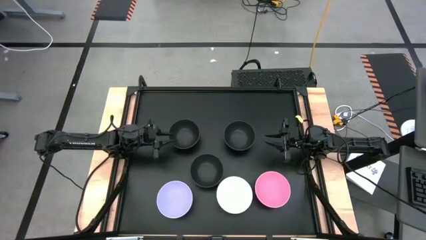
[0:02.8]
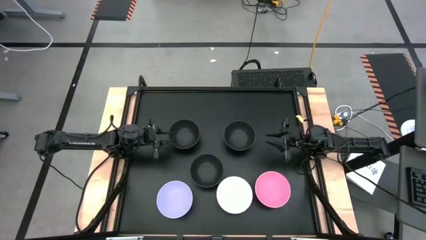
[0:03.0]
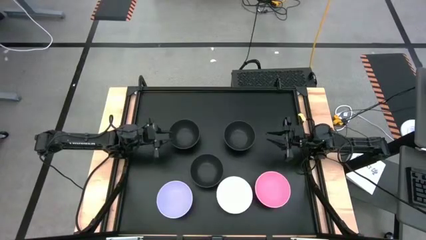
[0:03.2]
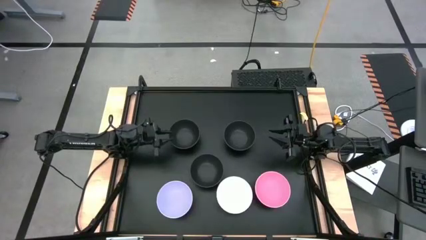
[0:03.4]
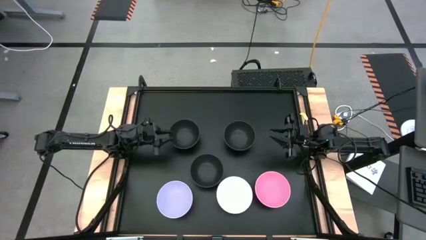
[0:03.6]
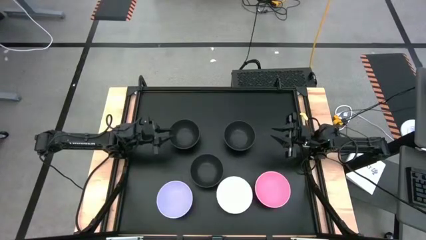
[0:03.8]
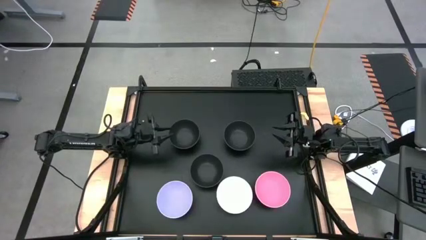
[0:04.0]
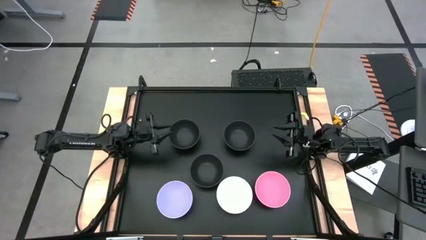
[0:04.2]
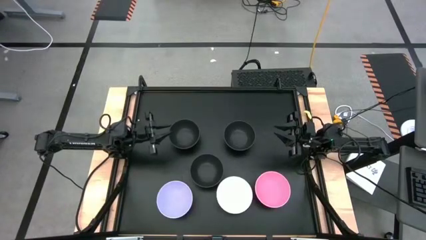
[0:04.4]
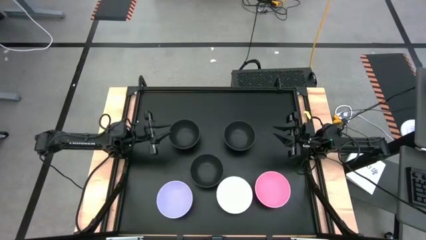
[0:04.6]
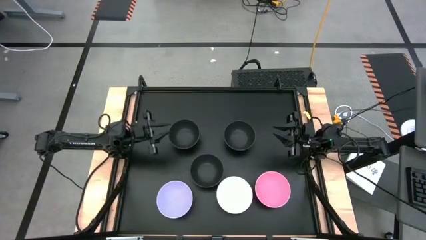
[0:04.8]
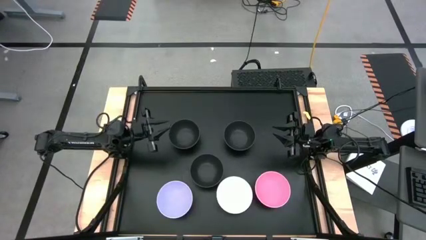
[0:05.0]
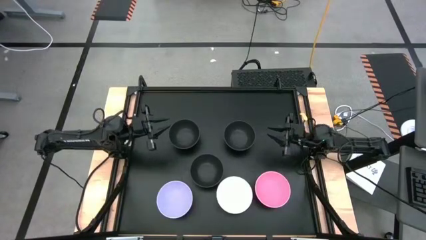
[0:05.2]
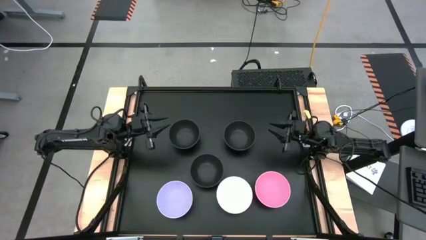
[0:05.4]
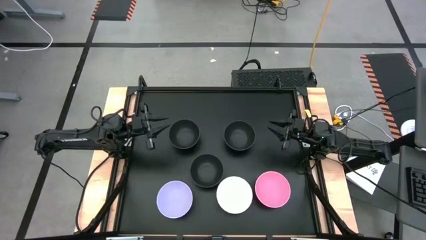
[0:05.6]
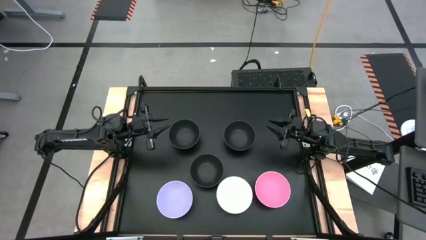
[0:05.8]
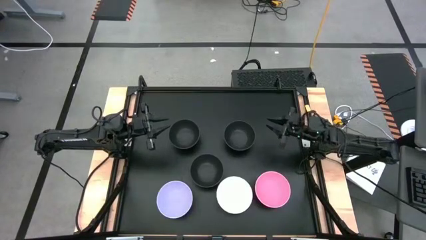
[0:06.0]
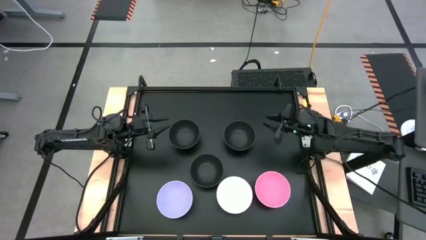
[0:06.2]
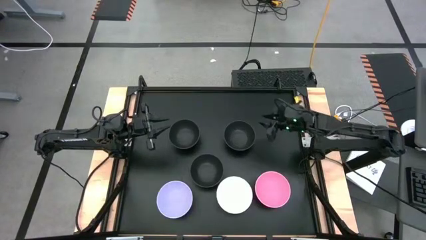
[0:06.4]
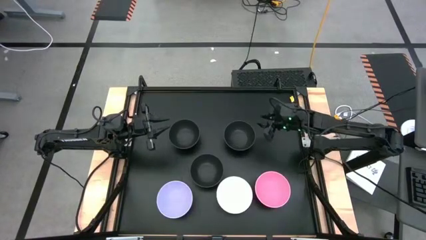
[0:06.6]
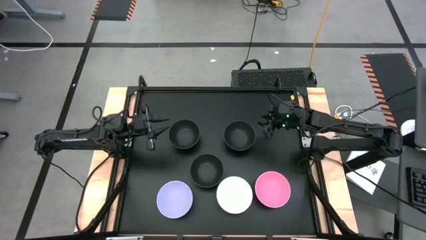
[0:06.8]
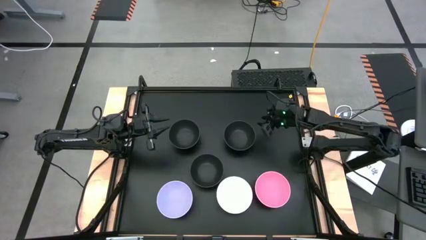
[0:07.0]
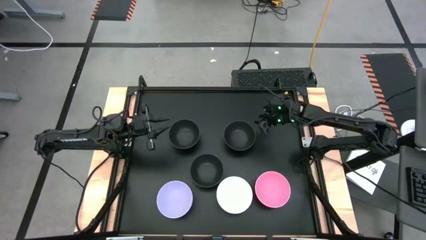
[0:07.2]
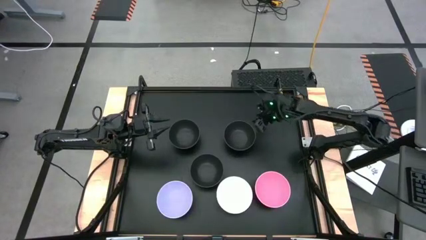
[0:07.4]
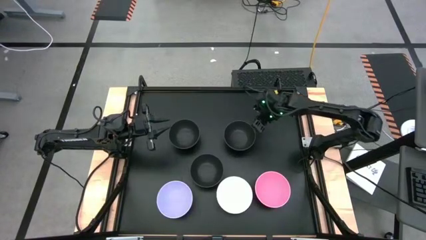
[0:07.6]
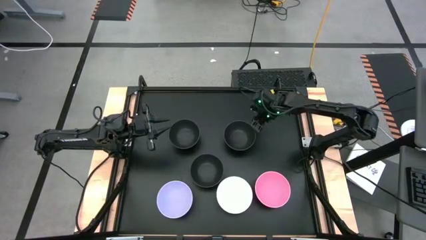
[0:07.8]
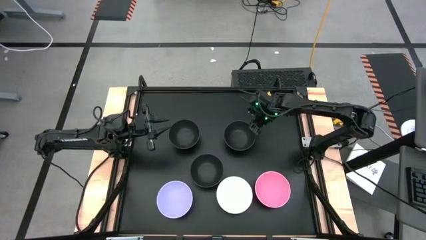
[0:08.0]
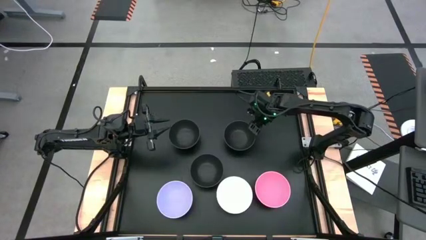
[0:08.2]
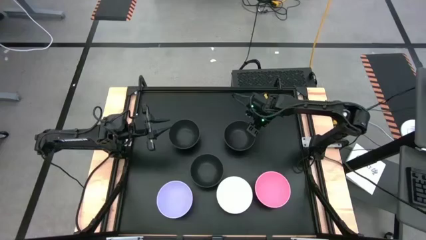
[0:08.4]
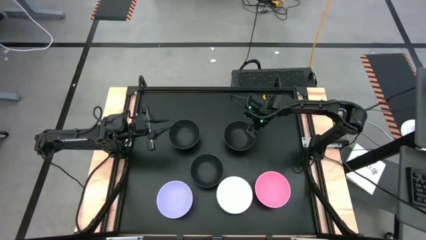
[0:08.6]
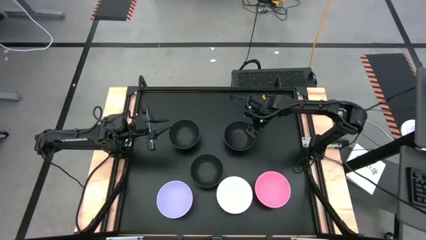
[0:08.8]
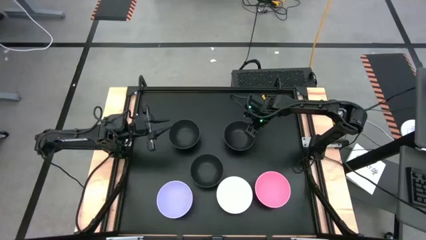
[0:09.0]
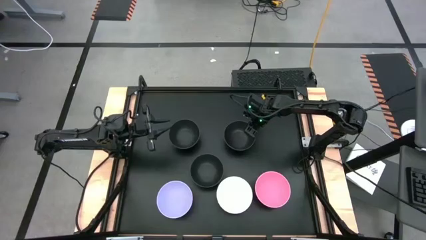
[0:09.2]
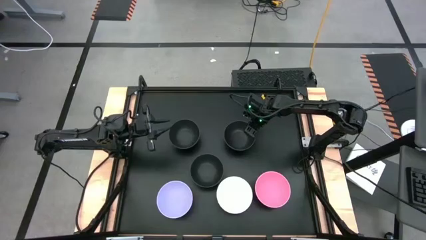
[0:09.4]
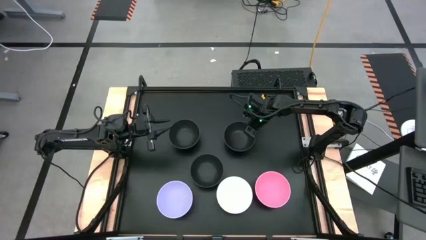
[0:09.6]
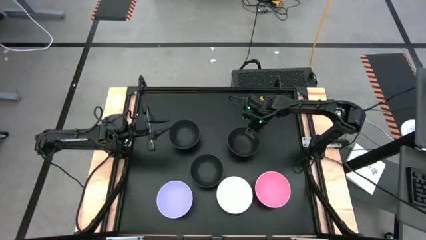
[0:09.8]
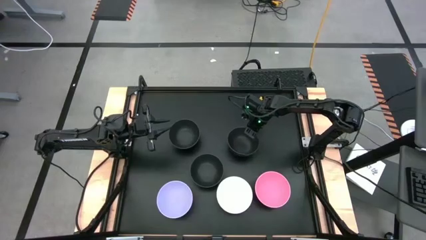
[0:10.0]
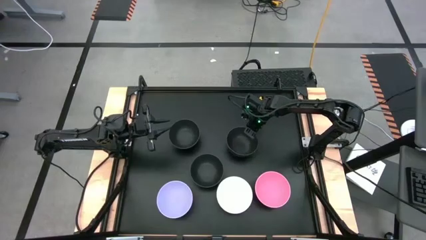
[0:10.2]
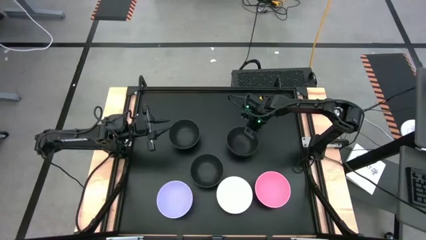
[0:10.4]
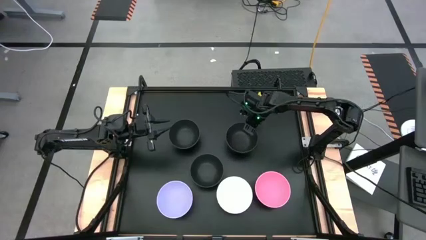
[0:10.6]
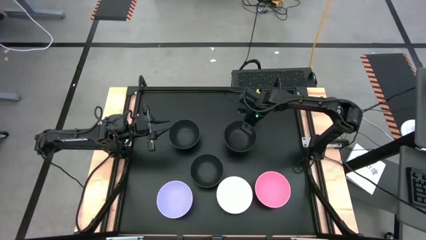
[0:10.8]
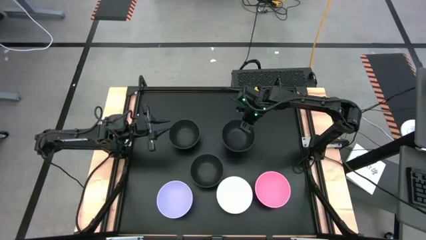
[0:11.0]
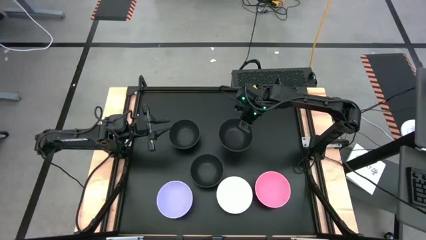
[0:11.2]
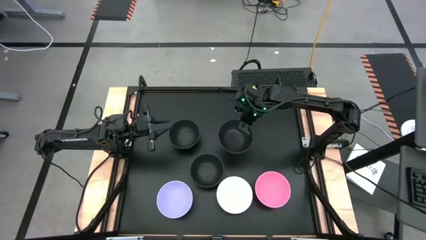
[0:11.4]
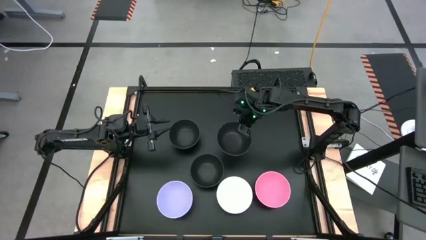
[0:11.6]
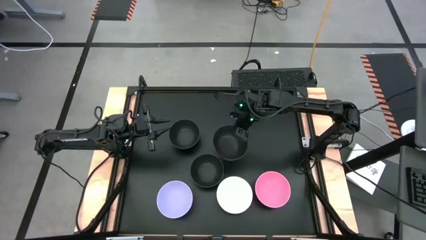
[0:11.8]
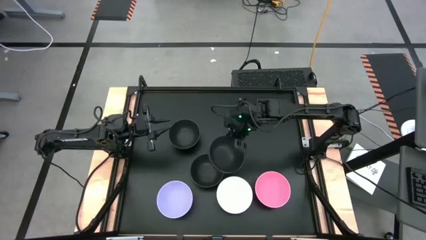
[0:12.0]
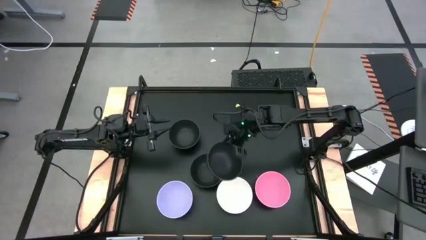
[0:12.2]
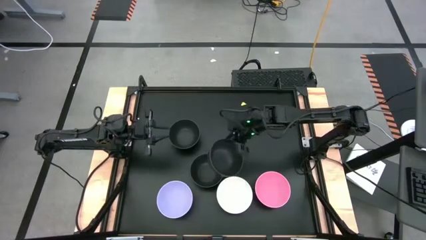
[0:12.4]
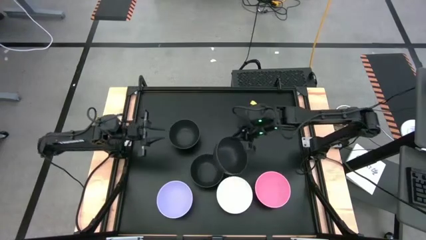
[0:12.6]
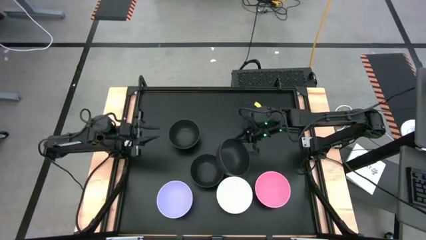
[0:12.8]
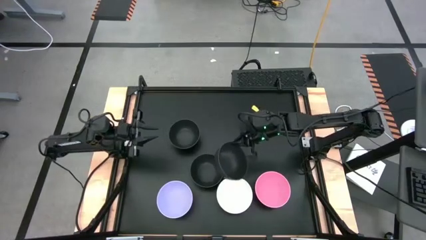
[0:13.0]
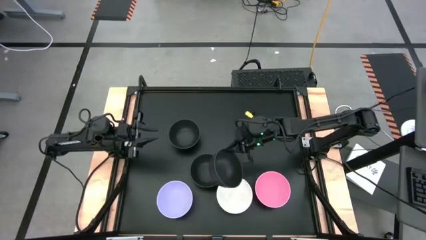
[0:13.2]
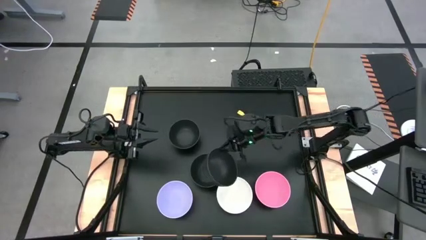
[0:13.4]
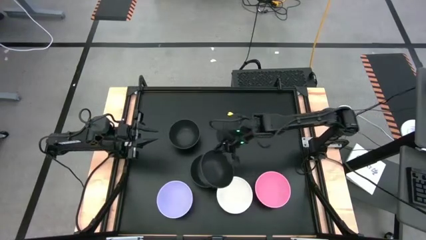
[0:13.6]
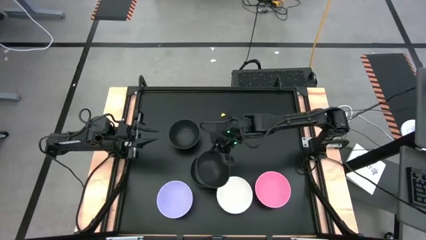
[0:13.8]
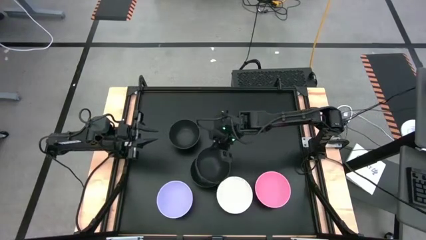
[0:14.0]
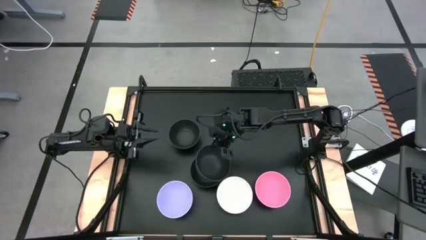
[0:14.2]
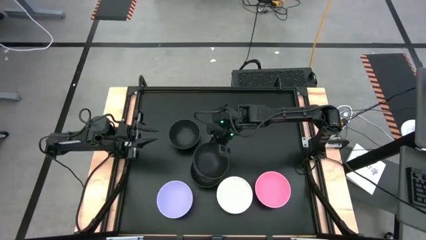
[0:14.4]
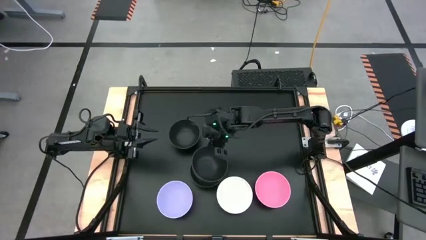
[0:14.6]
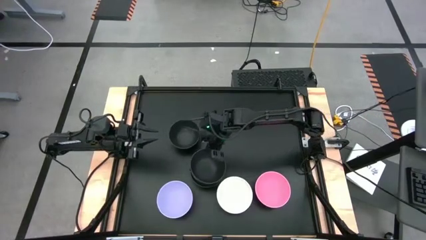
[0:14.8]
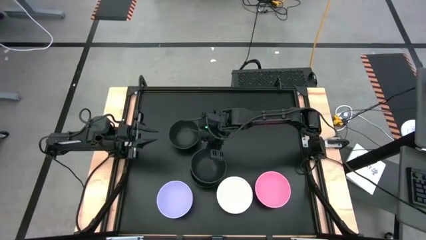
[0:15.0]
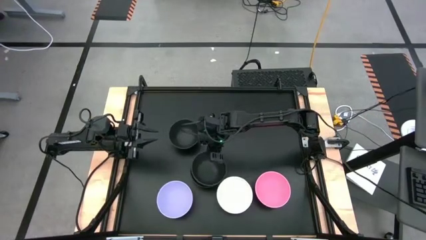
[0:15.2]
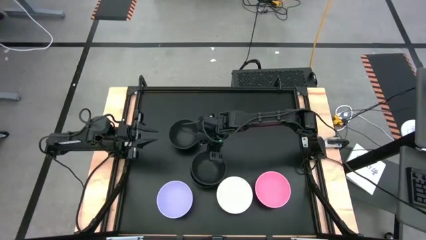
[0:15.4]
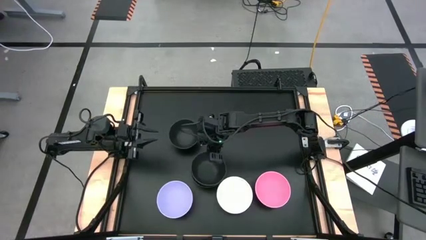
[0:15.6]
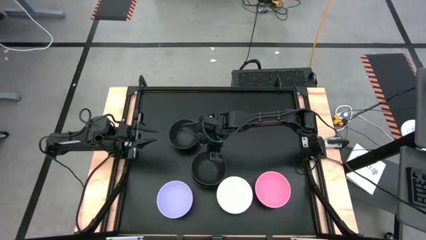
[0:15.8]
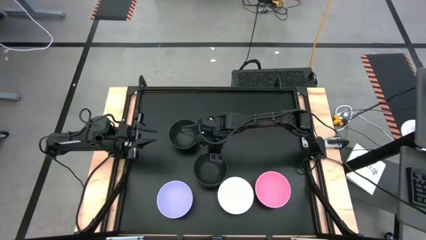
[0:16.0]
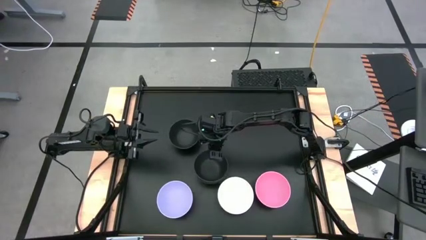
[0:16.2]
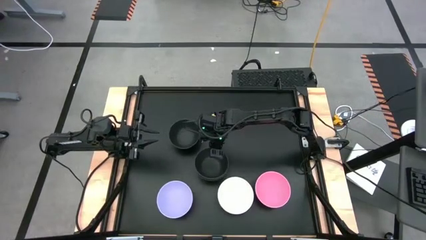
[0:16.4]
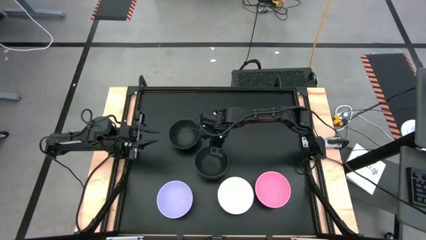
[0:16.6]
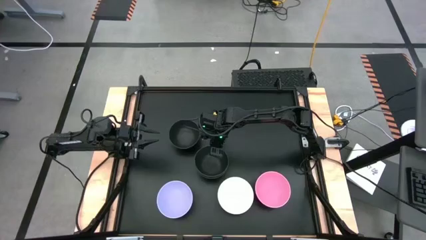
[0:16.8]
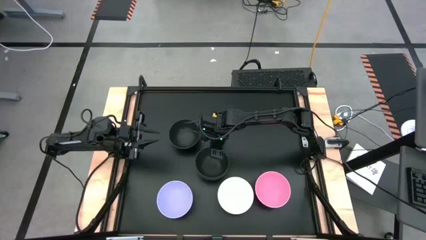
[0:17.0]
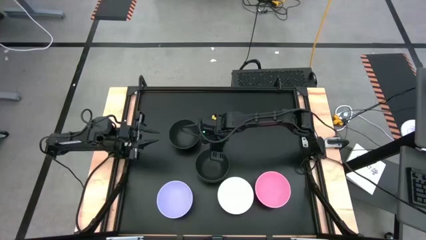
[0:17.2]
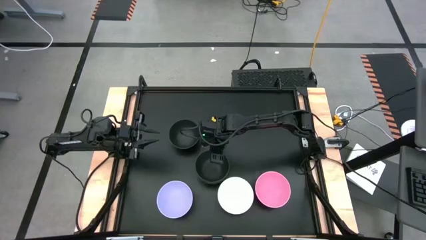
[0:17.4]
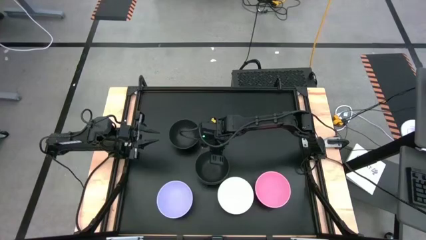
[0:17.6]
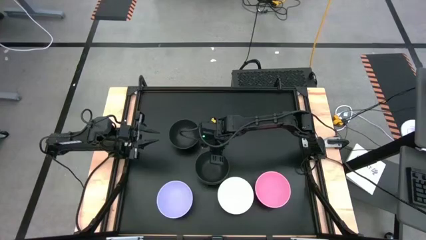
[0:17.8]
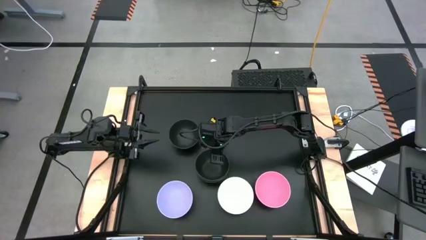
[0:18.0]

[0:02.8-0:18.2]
Task: Nest bowls inside each other
Stack the top right black bowl on top of the bottom black bowl
